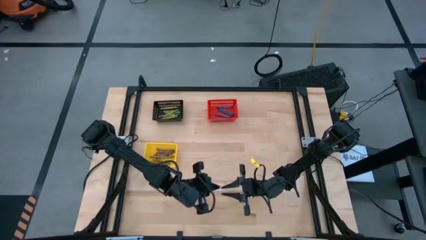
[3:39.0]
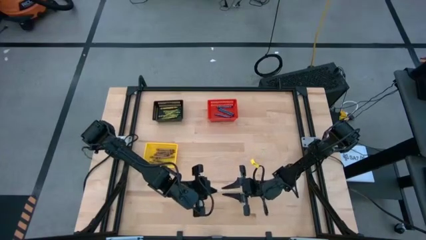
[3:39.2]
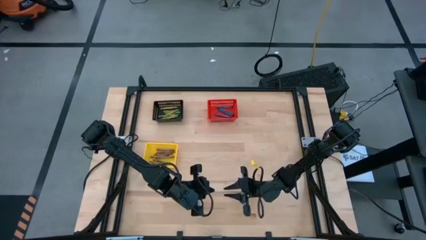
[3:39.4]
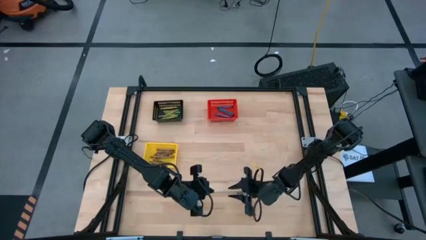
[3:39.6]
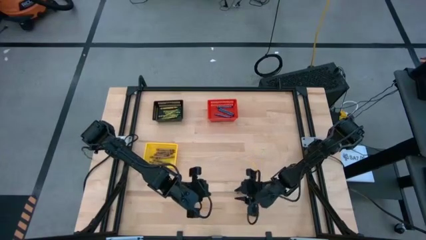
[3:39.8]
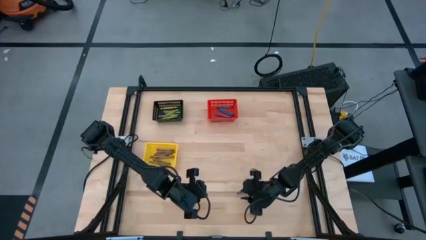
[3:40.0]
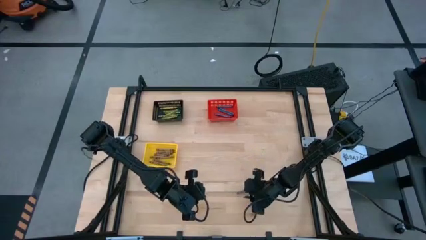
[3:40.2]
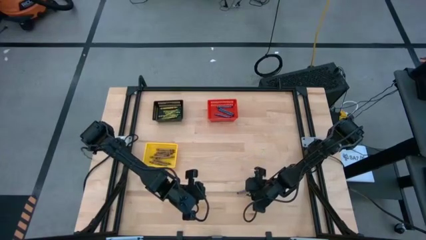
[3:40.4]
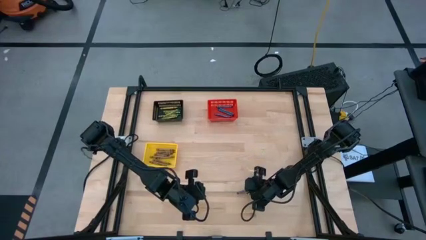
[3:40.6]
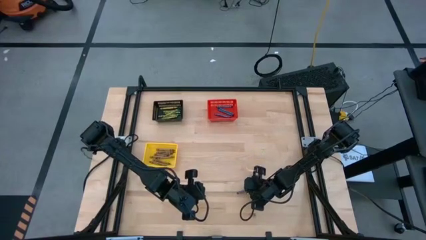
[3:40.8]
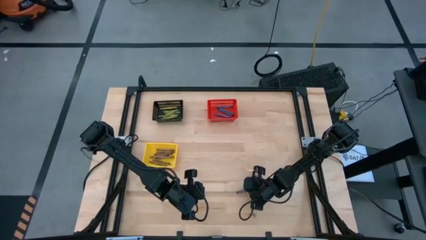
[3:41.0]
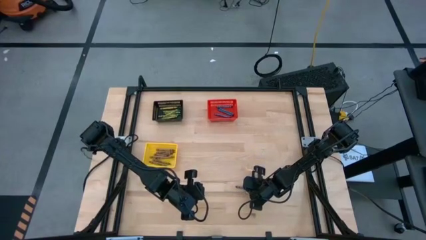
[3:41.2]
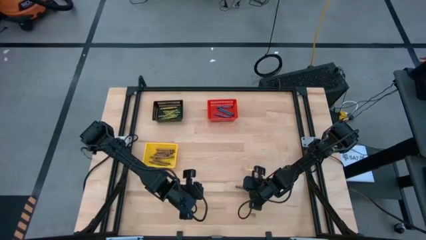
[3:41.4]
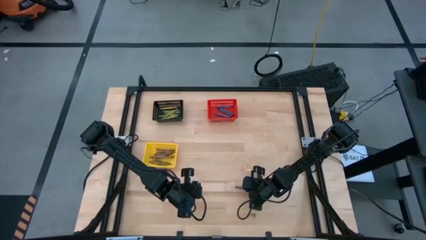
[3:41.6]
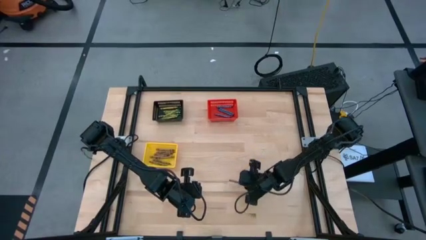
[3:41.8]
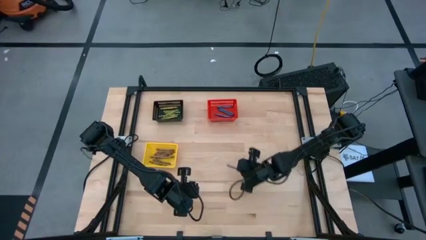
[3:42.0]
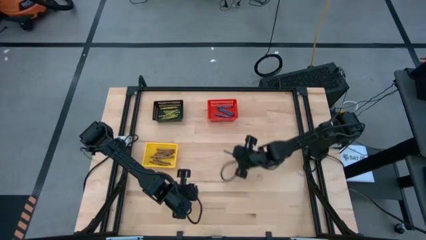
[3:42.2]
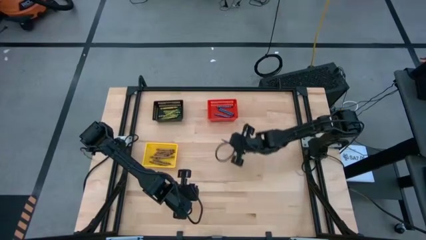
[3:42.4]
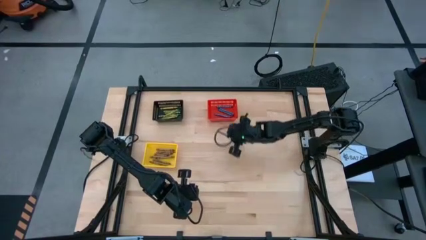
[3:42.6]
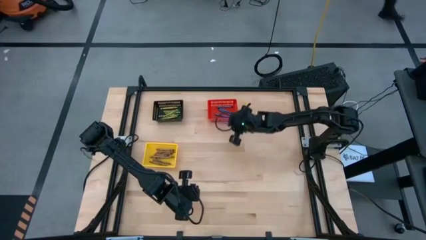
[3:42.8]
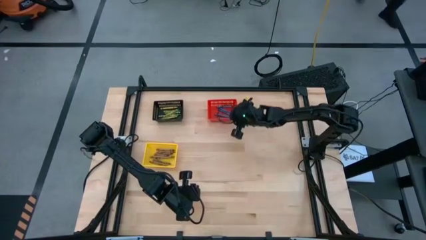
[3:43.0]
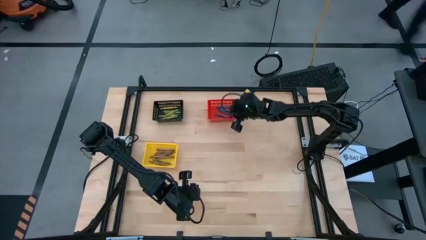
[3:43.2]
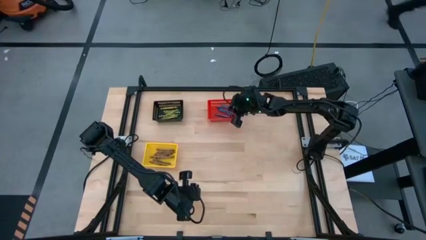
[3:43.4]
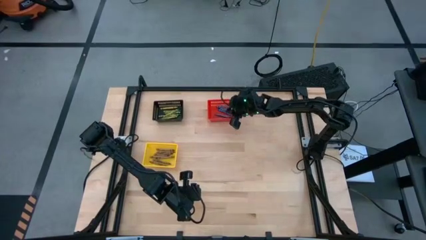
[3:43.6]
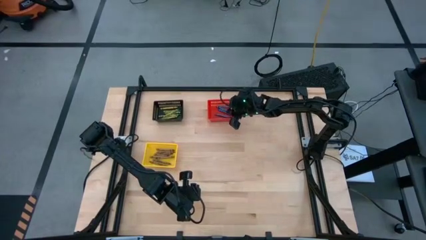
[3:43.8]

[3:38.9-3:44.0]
Task: Sort crayons
Put the blue crayon into the red basket

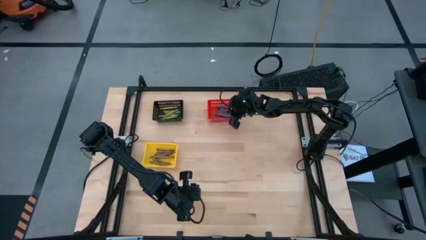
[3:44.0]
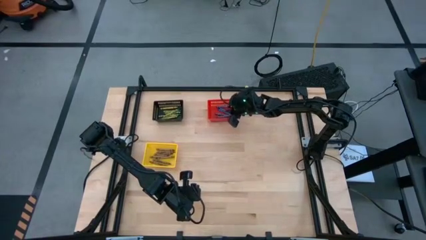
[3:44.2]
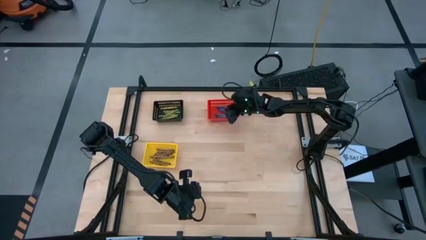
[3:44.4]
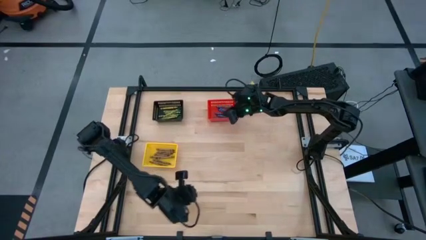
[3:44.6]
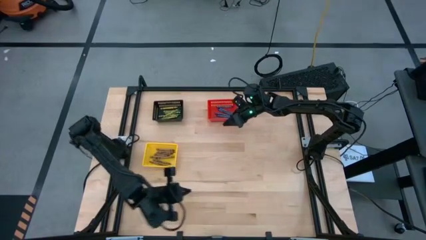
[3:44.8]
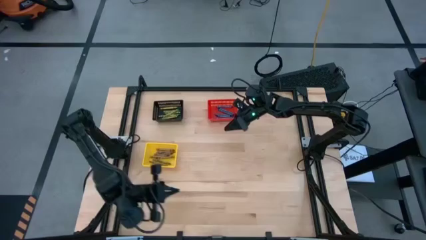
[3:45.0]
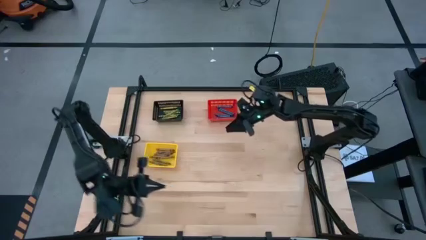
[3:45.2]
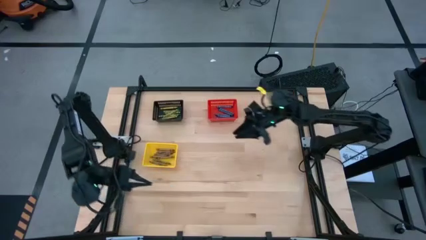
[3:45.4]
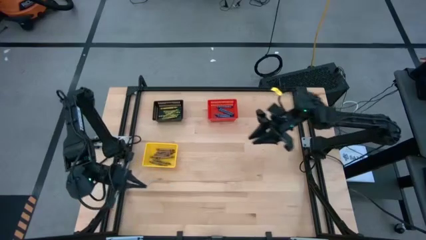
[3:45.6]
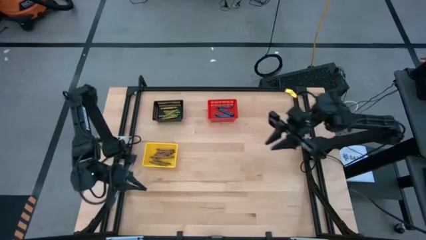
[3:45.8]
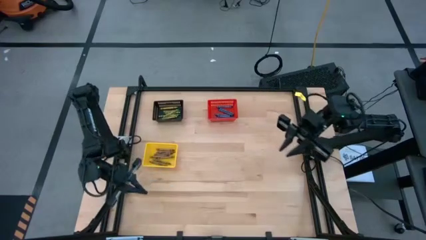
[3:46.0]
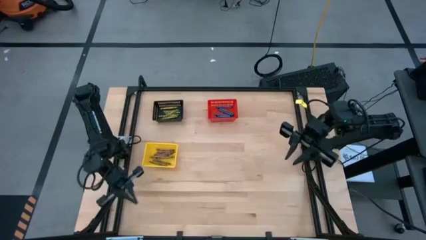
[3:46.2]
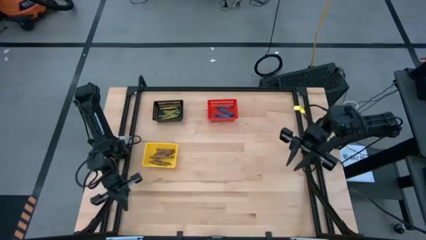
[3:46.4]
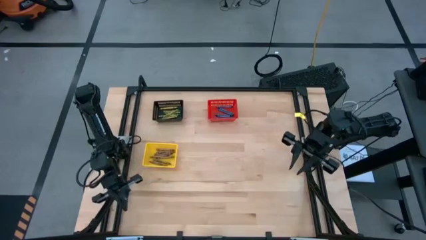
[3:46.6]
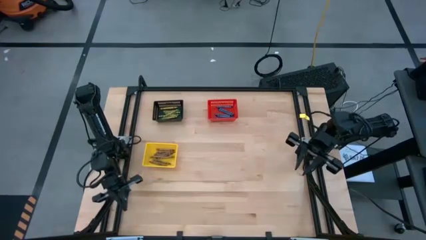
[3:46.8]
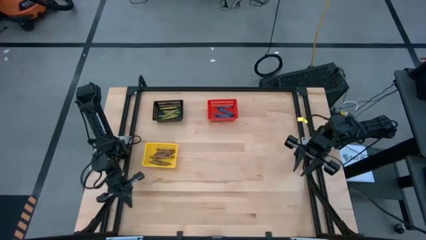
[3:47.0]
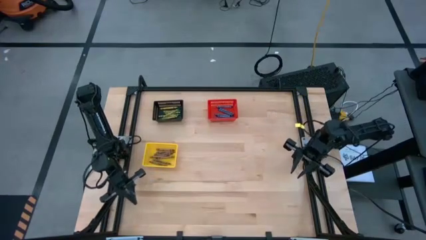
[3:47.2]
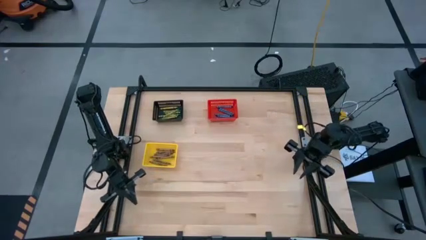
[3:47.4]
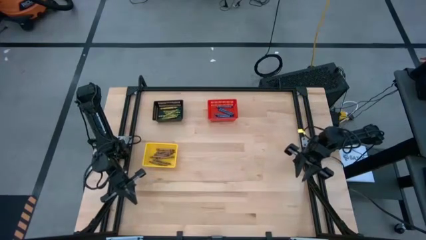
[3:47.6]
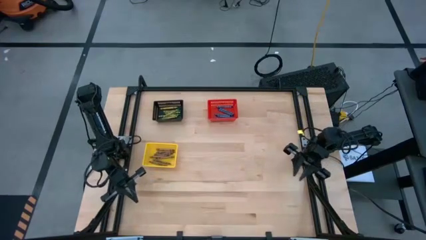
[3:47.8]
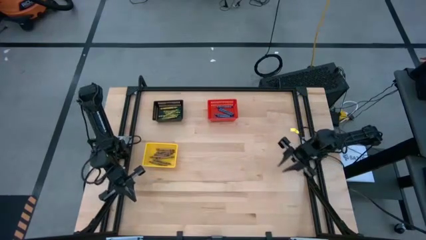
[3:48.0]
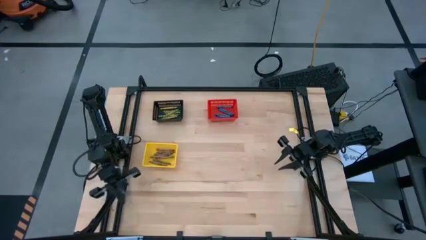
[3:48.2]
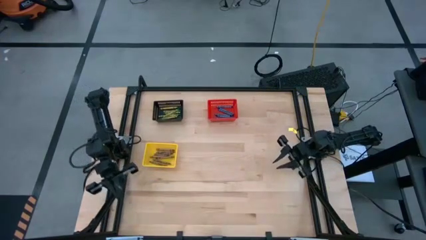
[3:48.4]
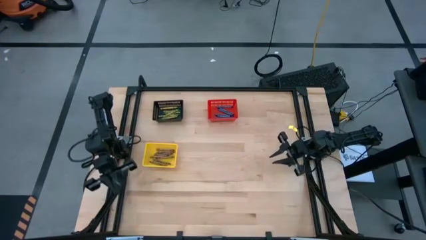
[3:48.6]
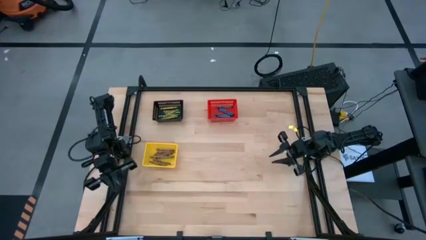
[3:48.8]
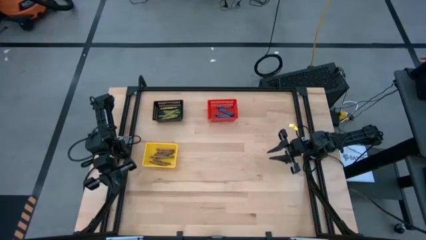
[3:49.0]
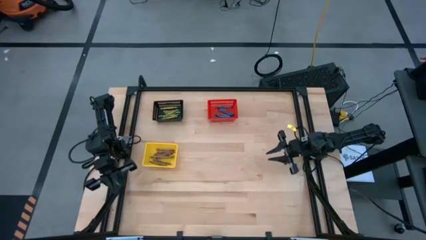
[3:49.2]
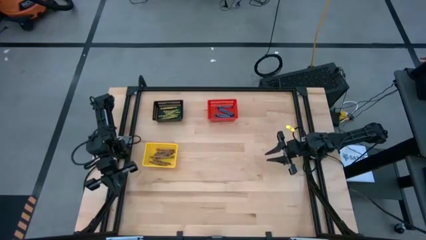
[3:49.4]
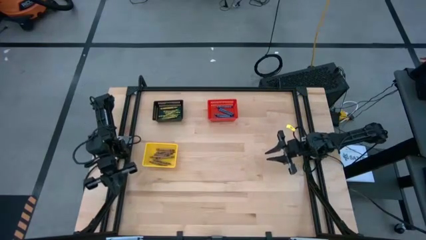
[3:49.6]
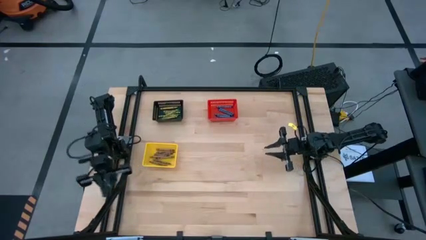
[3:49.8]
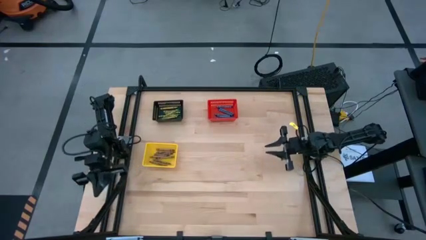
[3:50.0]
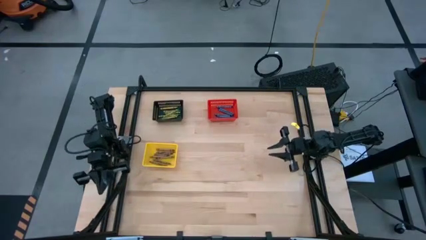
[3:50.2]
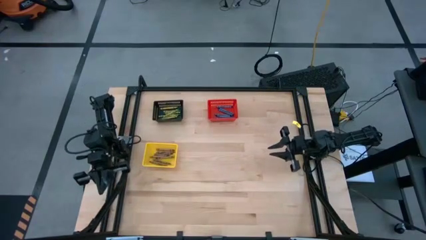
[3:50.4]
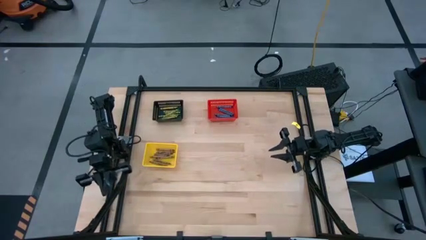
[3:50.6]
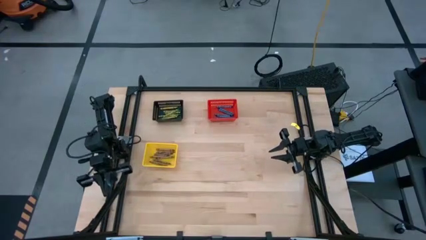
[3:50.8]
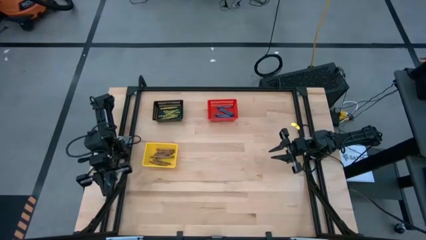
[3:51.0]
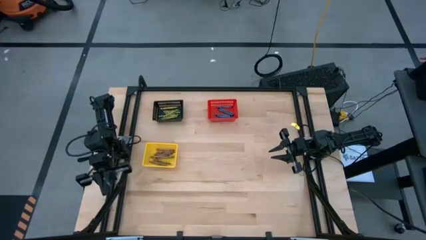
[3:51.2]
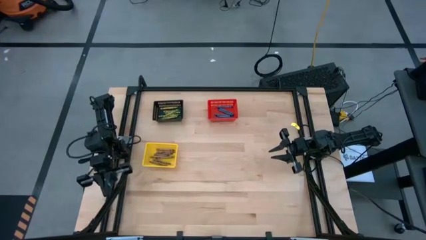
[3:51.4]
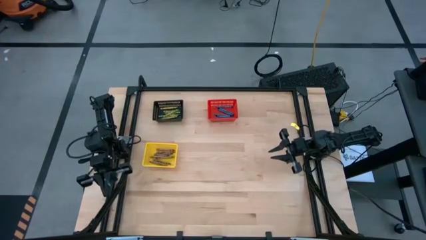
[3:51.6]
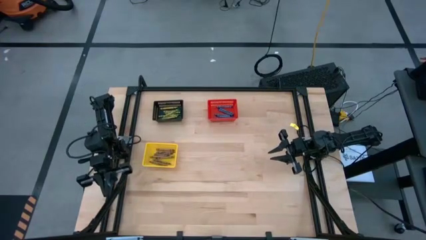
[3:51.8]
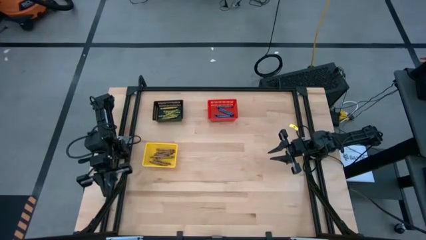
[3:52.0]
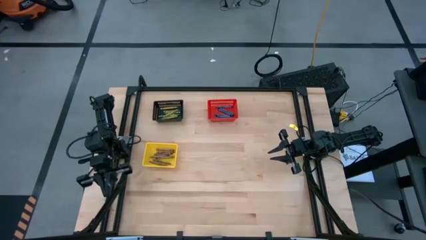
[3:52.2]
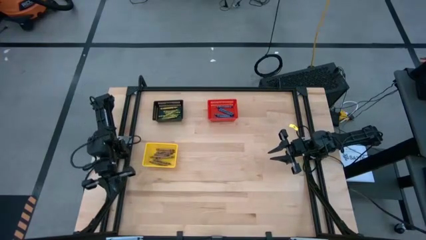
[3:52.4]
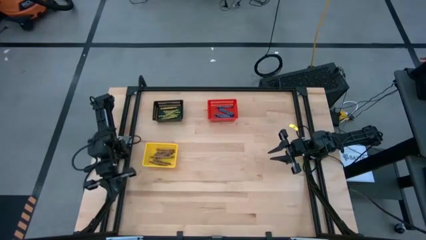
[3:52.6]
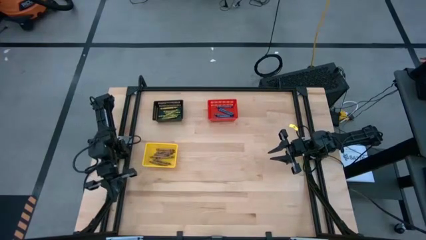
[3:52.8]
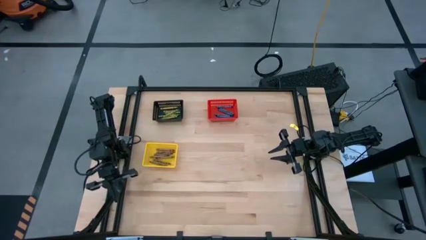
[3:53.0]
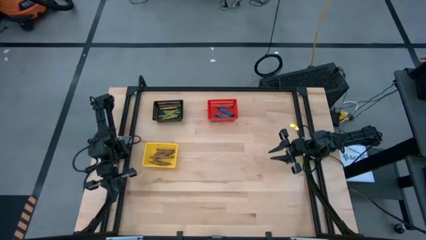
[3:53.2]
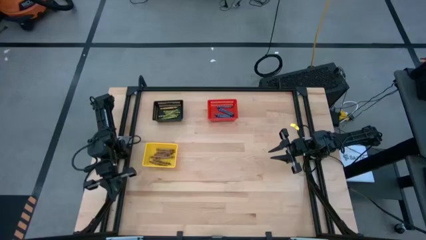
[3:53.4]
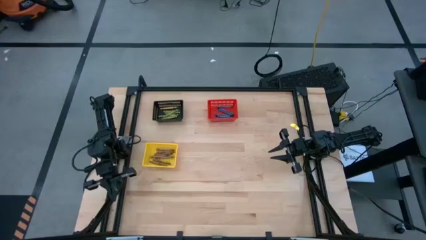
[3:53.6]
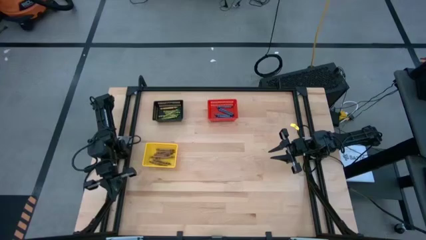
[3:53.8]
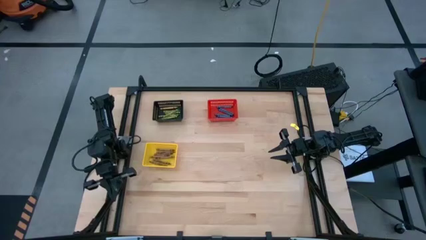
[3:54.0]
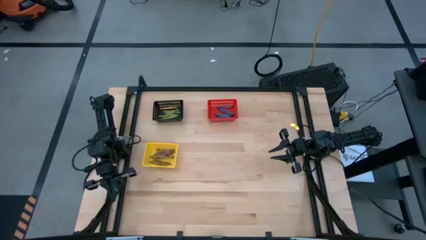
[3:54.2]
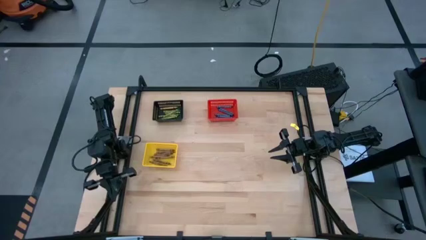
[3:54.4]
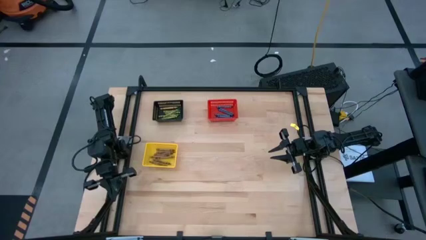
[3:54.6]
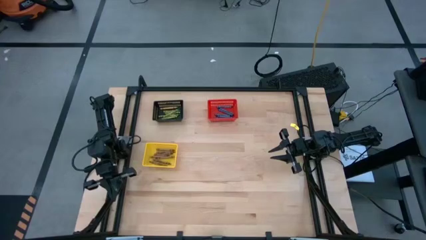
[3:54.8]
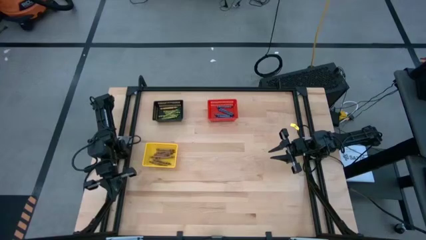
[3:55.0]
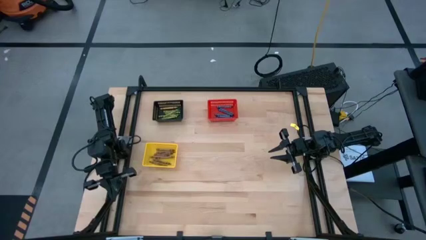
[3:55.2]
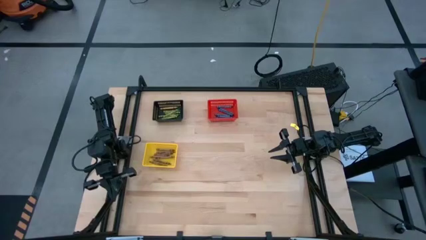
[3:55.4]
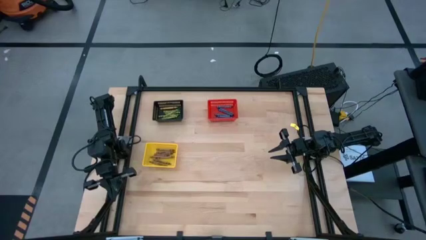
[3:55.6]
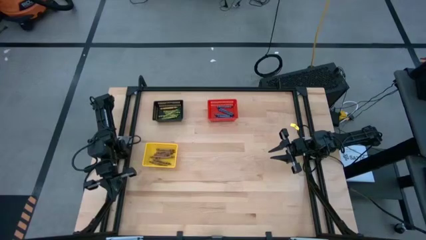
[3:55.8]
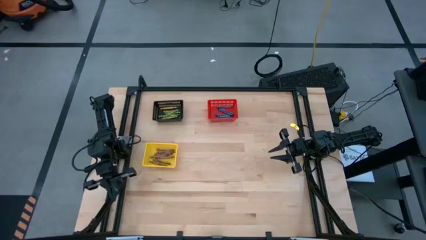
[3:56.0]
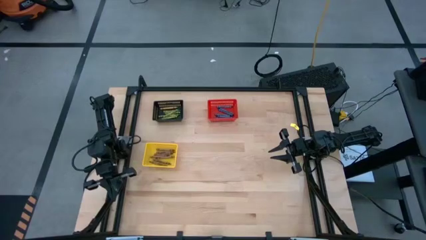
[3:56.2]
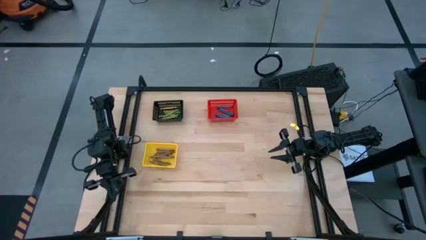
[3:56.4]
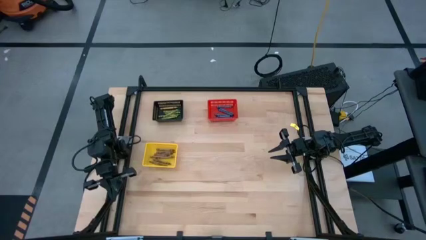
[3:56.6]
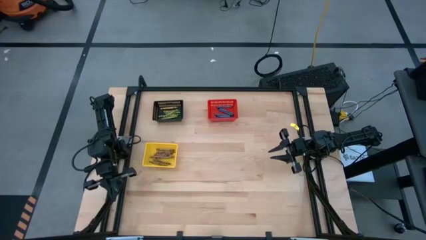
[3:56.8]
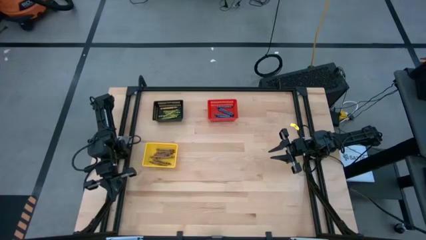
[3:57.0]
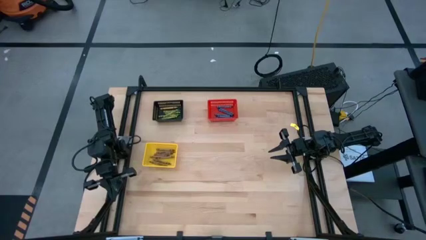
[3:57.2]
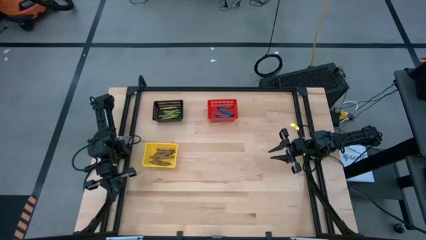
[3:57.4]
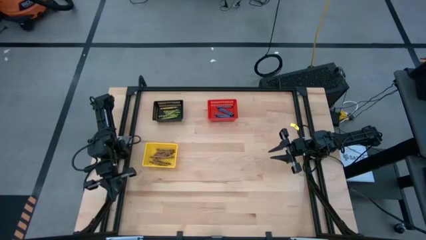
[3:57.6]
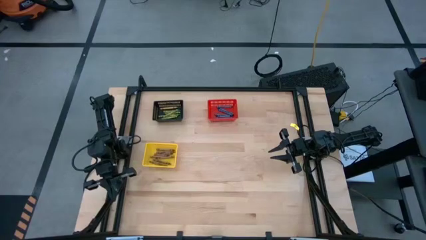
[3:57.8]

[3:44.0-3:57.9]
Return to Home Position
